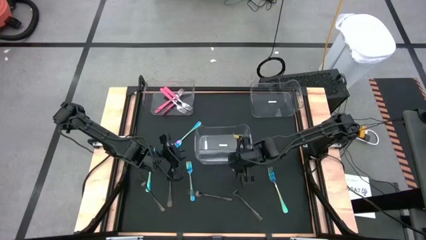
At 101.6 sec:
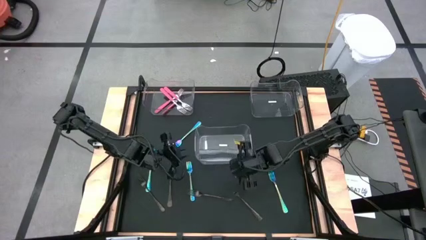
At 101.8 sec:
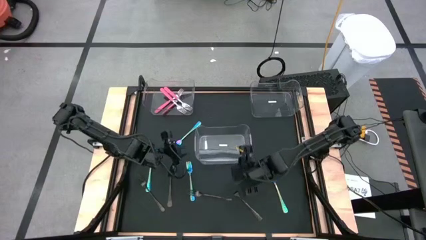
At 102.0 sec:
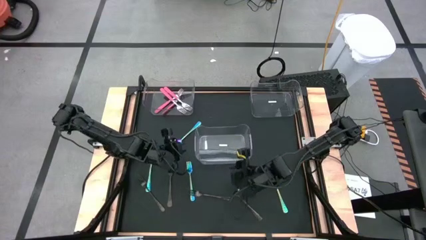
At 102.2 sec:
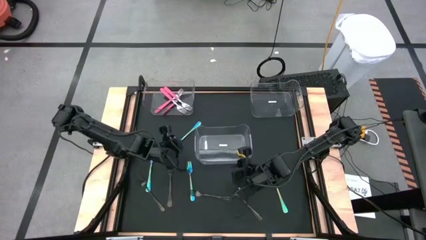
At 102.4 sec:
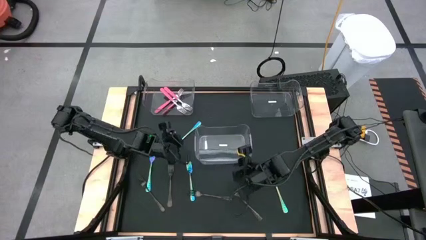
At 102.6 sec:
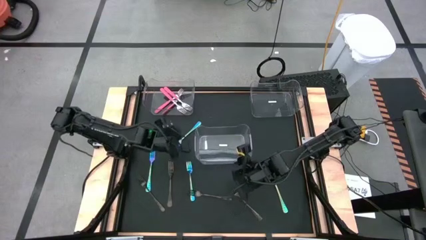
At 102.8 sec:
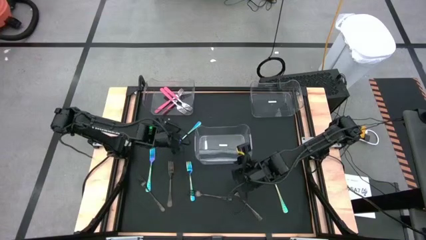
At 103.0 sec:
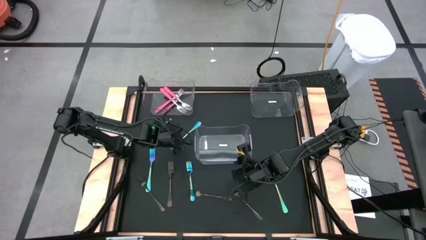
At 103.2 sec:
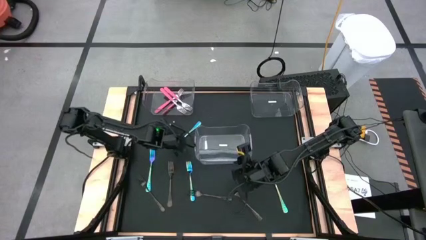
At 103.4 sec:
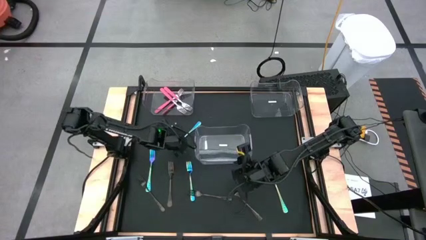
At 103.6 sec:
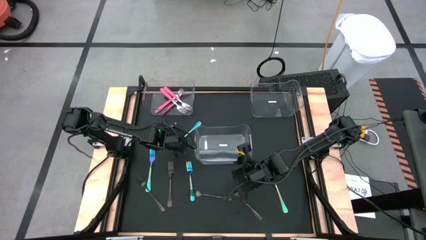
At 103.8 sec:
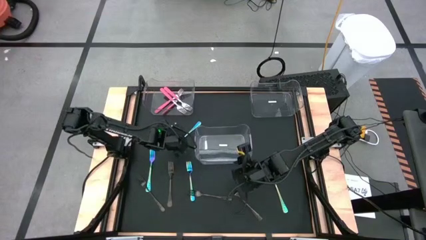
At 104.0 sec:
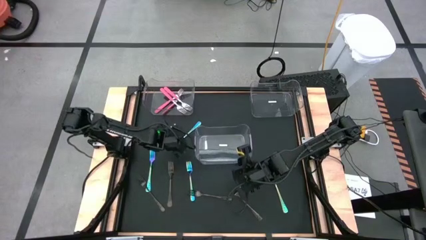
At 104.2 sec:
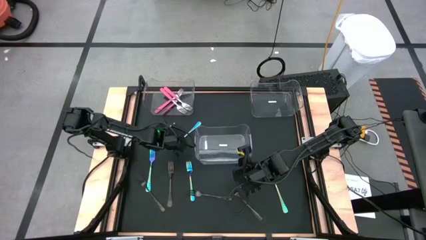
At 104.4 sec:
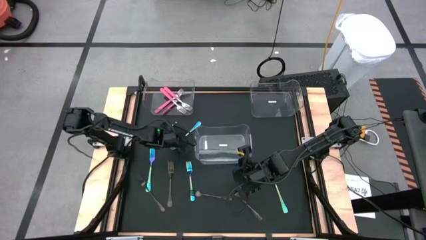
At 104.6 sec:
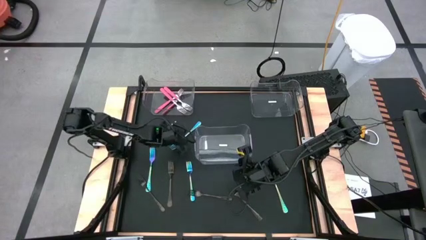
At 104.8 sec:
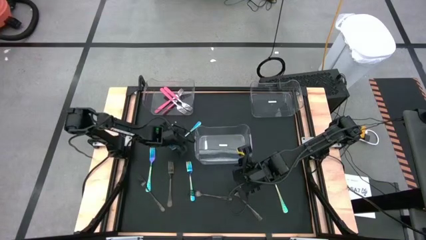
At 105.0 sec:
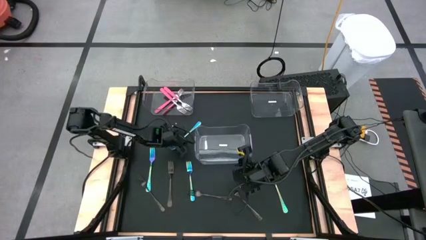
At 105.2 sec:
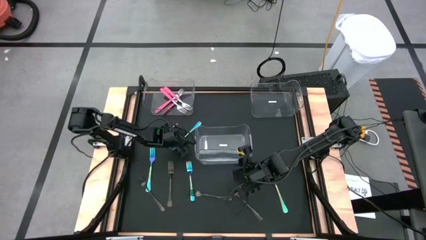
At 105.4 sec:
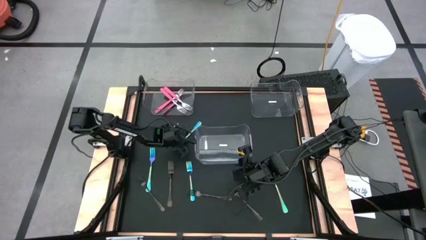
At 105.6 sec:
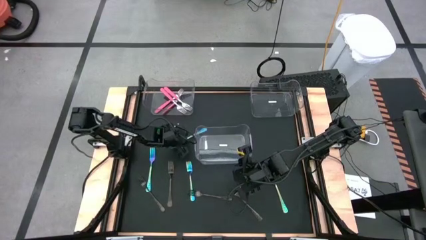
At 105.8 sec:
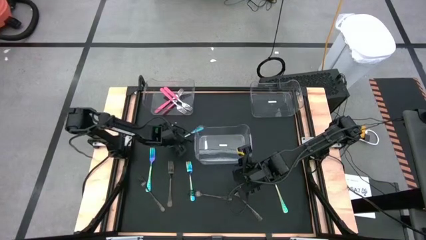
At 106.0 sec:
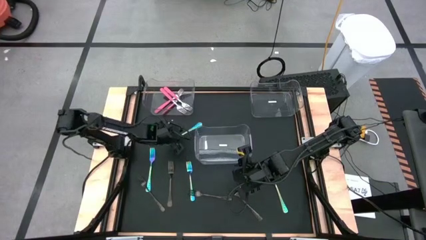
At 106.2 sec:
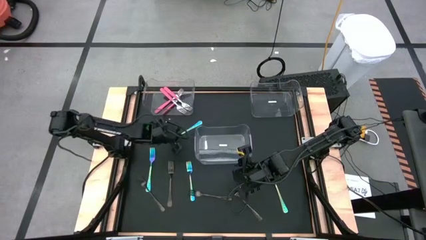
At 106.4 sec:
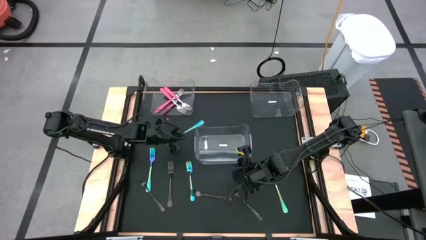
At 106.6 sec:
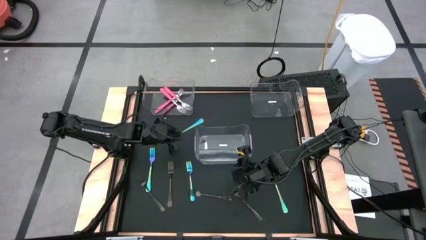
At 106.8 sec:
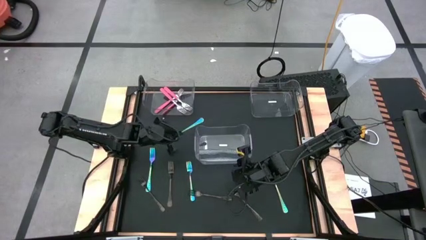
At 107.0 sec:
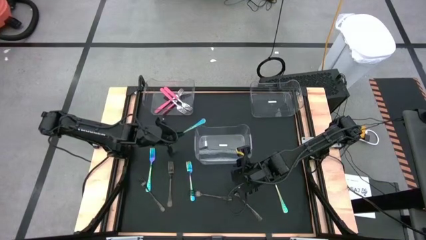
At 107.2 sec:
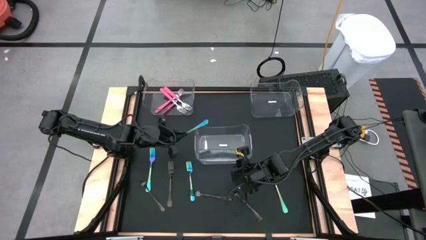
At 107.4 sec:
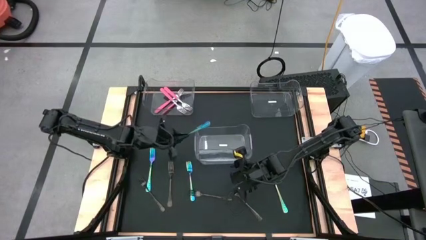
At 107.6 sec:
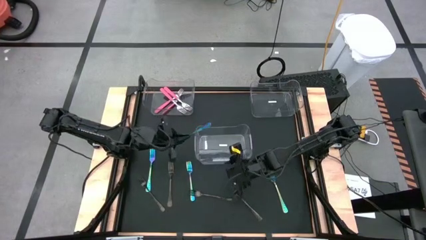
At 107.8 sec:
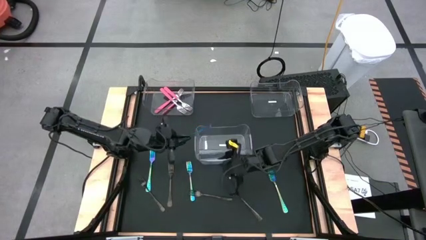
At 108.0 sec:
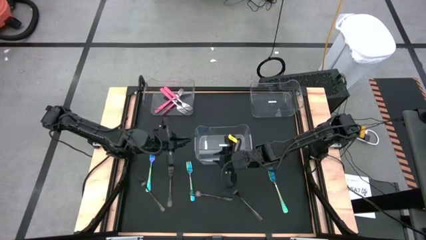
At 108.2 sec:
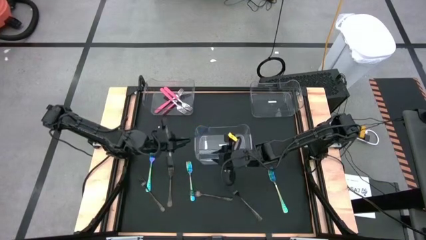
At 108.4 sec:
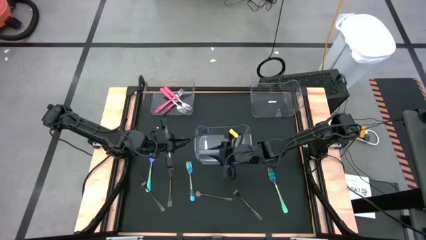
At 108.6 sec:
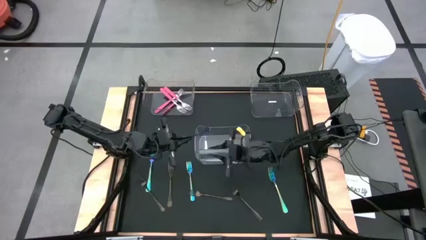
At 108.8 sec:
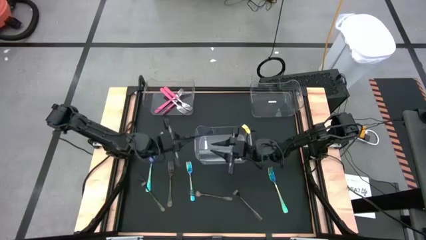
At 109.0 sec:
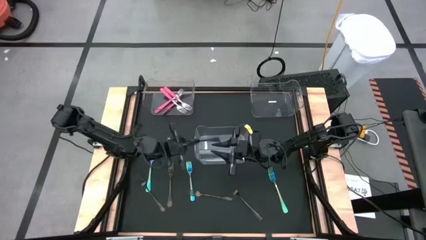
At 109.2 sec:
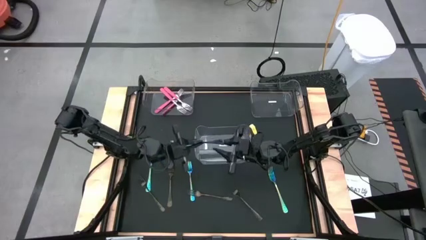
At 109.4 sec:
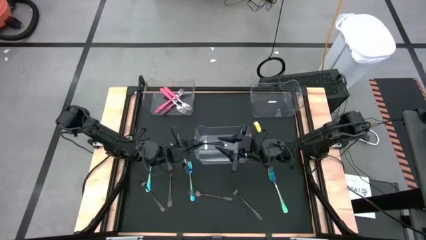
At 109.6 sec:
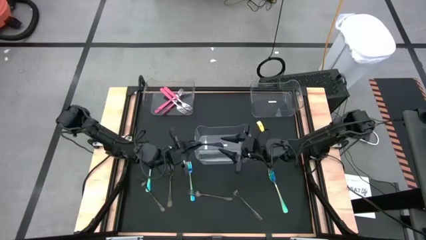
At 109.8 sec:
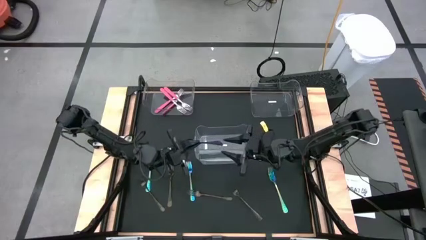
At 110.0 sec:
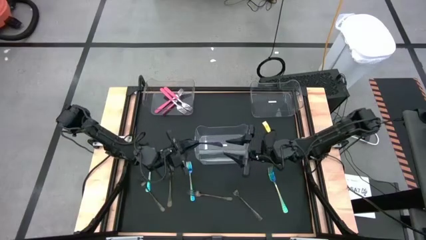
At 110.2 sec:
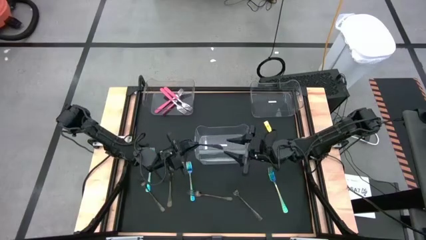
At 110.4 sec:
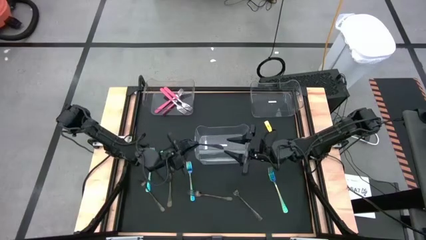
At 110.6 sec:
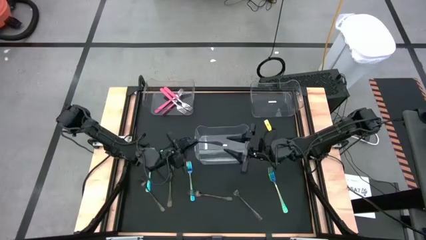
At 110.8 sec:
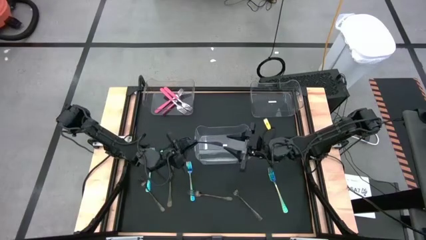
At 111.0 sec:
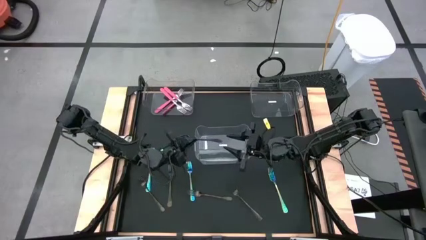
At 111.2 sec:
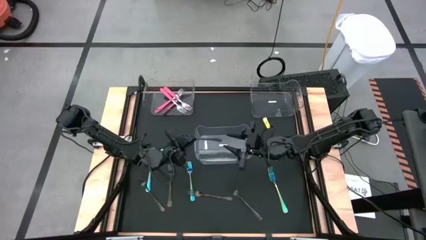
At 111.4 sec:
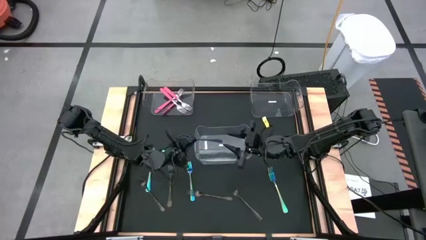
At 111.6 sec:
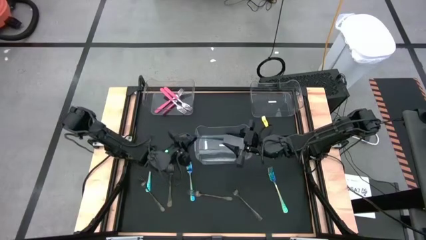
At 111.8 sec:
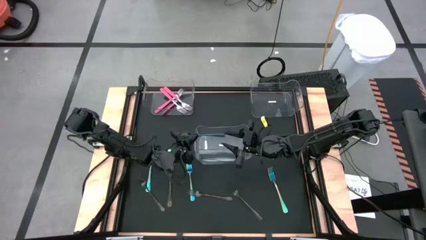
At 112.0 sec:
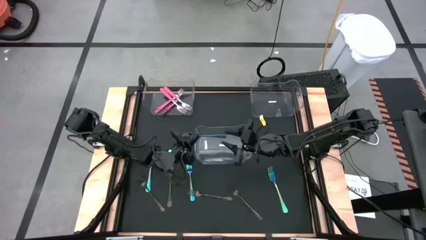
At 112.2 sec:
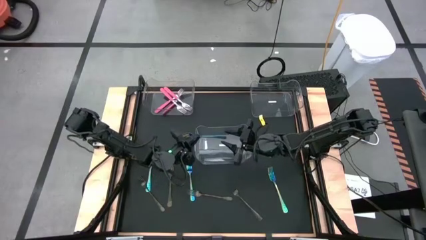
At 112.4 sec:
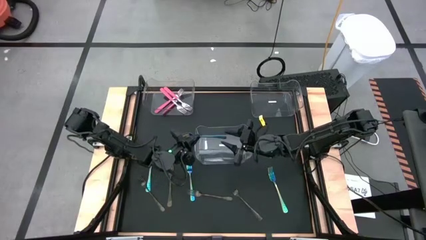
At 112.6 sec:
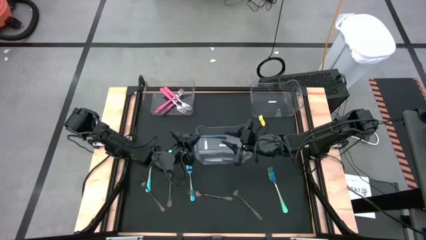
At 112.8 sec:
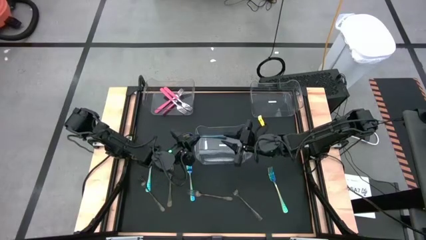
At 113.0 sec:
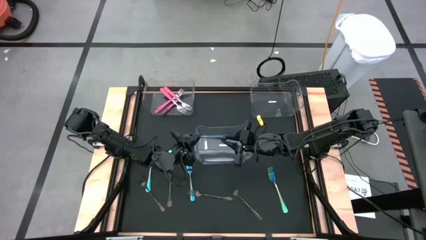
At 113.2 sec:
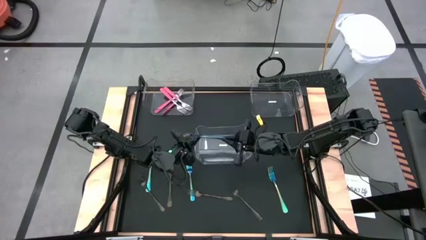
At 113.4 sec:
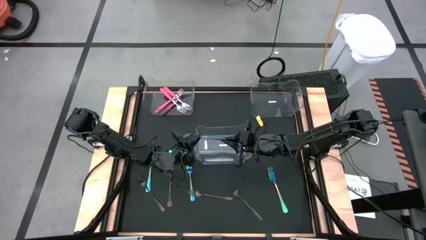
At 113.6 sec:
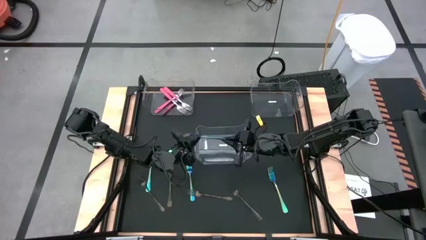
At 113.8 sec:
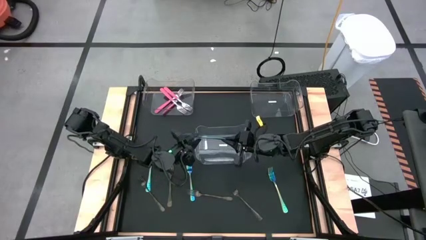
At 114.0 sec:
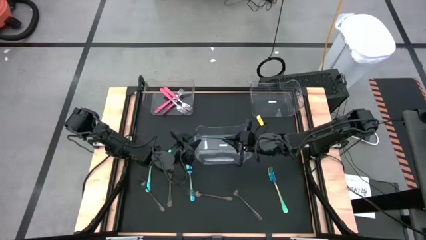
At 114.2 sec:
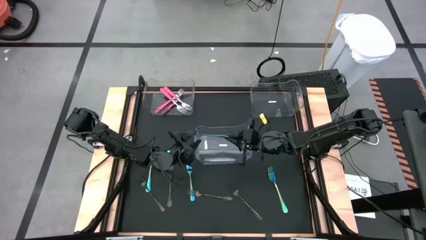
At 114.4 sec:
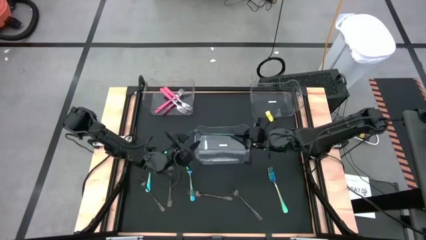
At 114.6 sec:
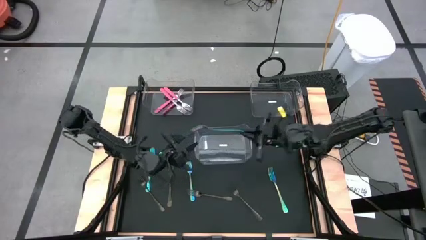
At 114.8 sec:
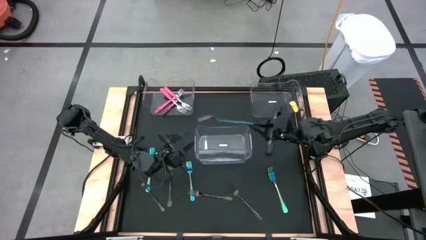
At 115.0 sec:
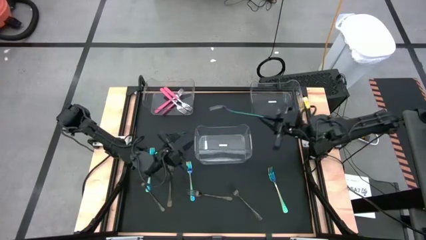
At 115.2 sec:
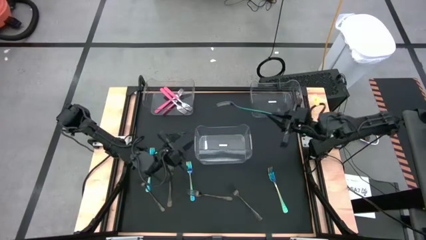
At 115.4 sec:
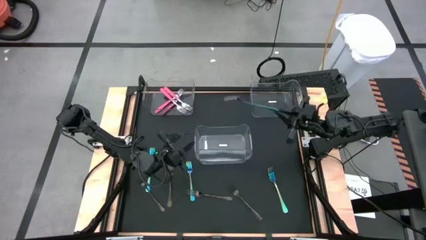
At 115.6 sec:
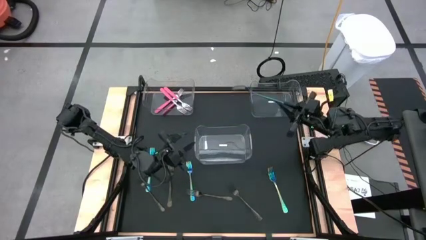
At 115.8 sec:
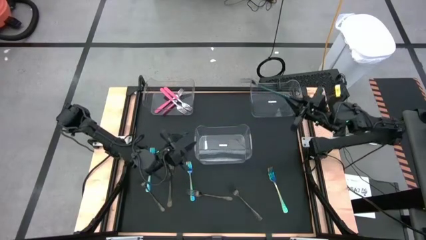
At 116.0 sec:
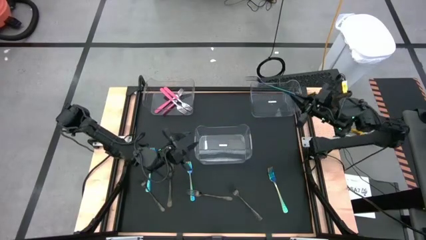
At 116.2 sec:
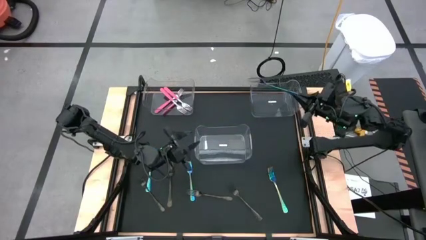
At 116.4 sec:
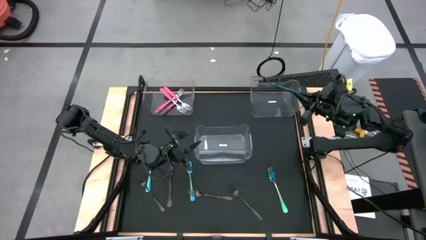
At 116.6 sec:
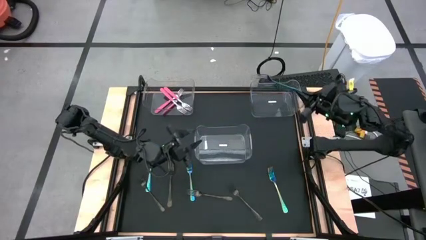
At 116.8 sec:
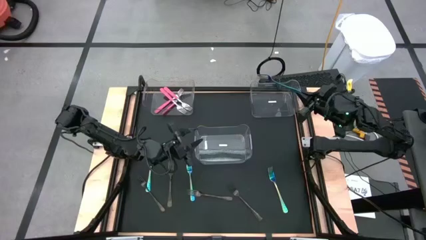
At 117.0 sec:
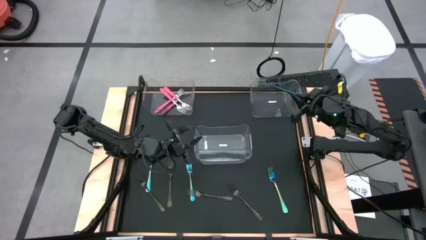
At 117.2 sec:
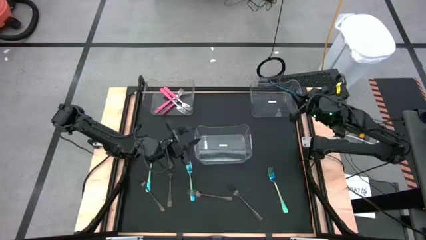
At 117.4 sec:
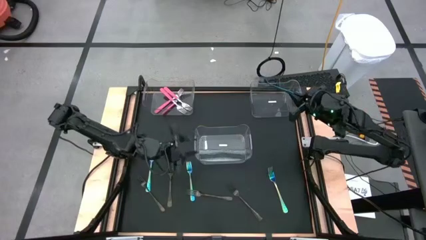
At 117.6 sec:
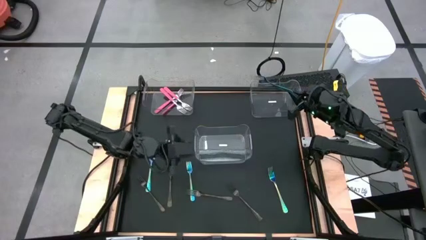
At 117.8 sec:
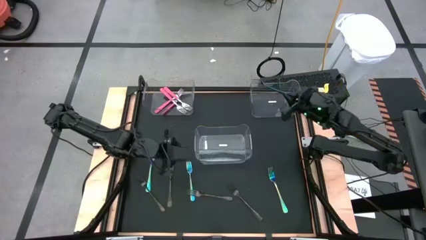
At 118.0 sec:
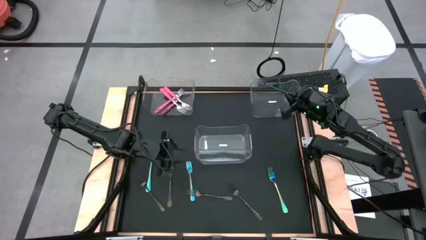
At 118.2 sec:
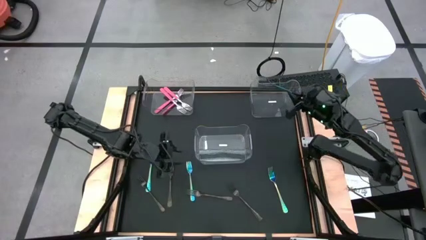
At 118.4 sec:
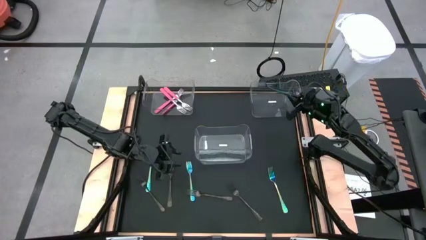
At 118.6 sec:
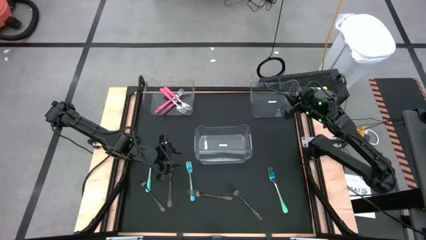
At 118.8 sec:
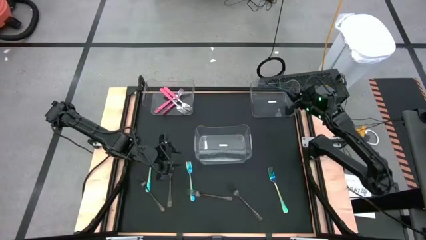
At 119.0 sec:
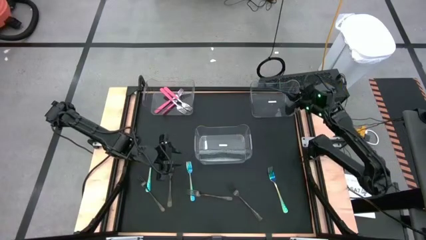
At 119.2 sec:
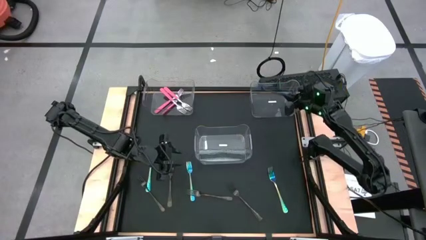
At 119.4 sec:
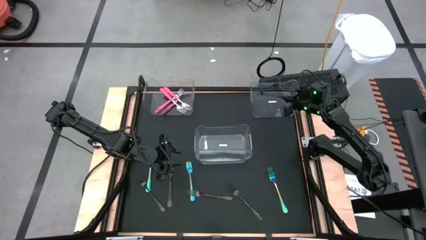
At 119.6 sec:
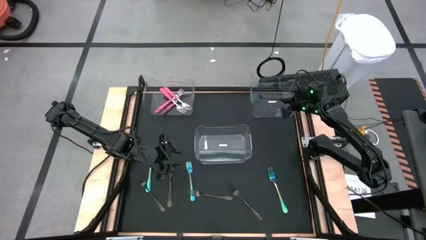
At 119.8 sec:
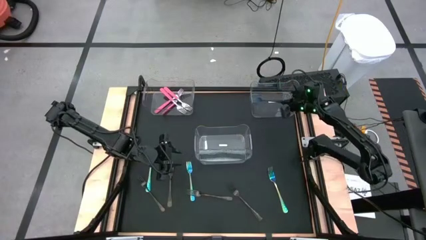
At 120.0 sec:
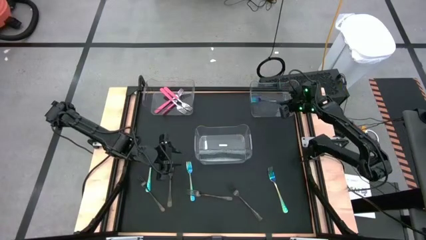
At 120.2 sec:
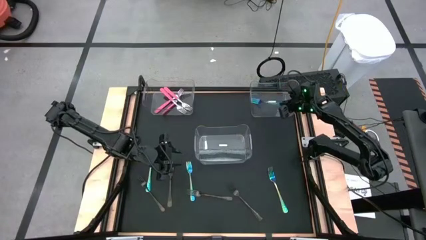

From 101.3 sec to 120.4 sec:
Task: Sort silverware by color (type)
Put the blue fork into the right transparent bin
